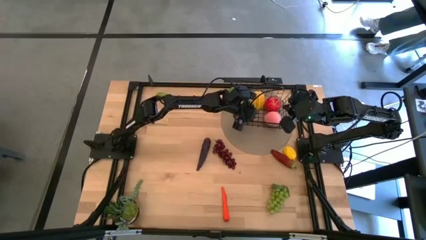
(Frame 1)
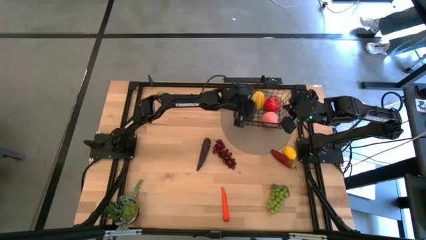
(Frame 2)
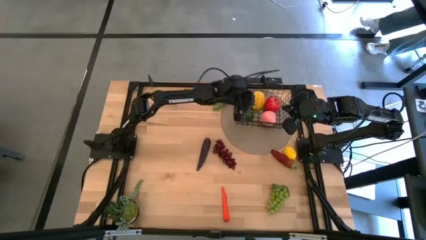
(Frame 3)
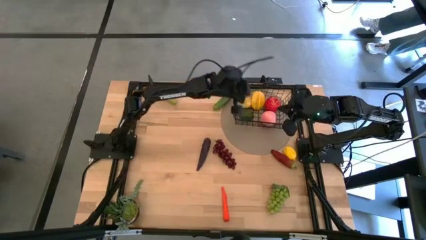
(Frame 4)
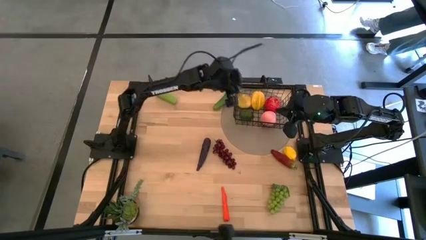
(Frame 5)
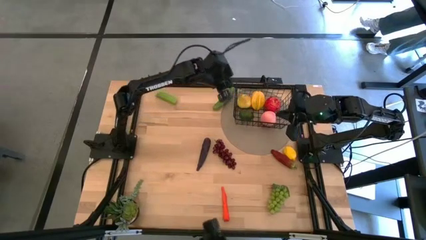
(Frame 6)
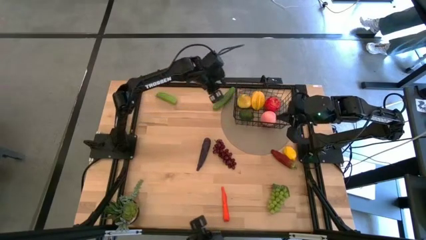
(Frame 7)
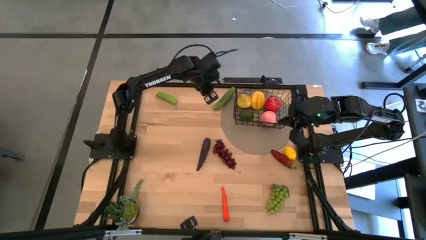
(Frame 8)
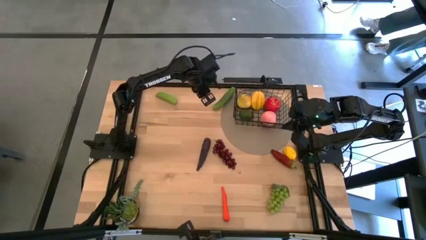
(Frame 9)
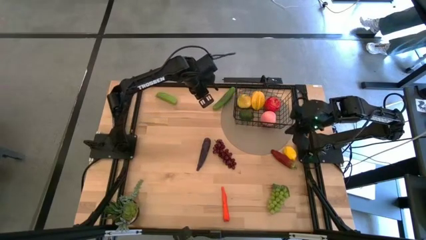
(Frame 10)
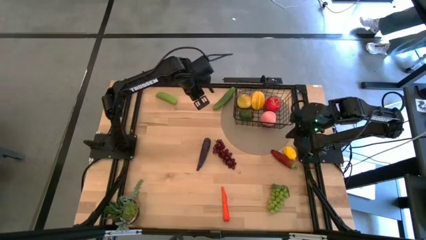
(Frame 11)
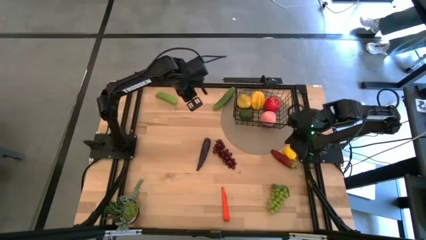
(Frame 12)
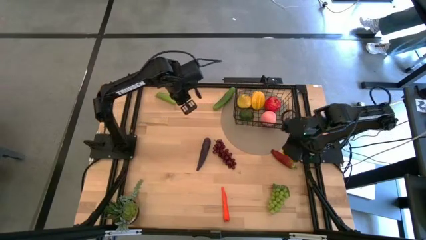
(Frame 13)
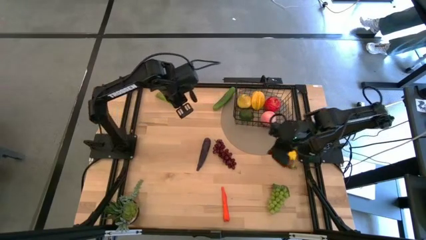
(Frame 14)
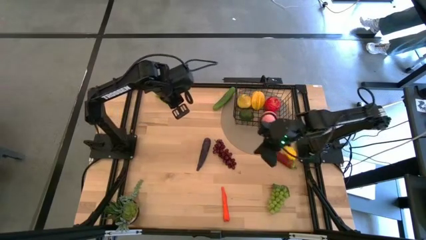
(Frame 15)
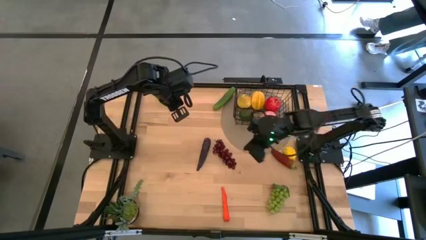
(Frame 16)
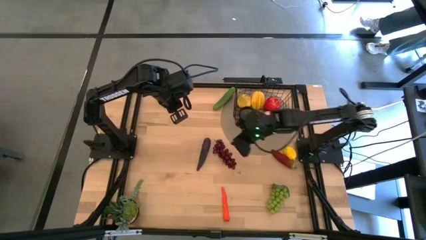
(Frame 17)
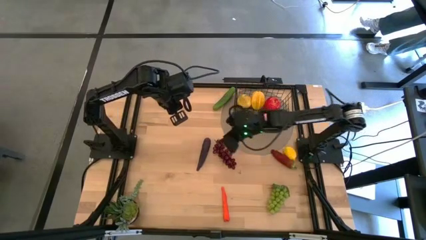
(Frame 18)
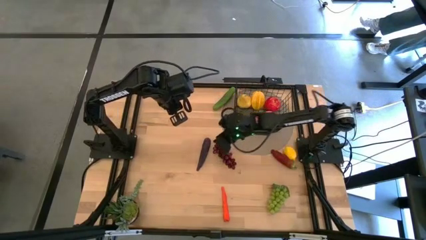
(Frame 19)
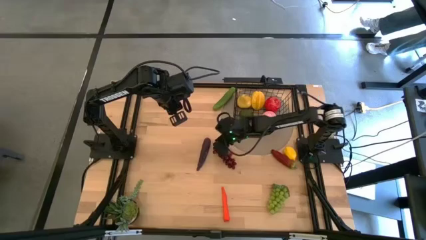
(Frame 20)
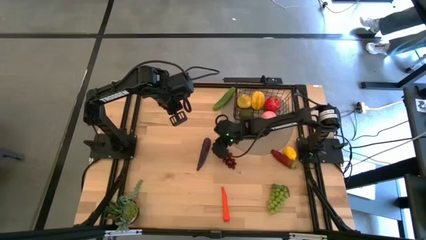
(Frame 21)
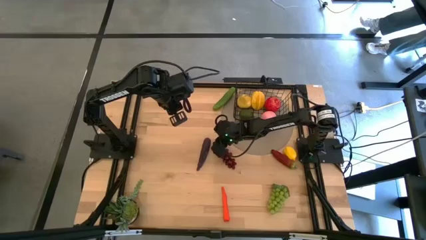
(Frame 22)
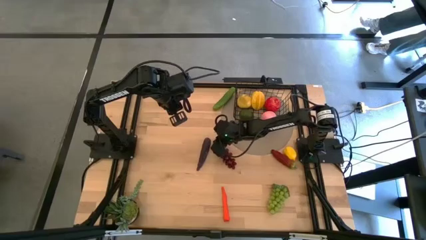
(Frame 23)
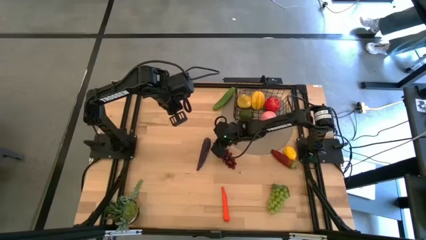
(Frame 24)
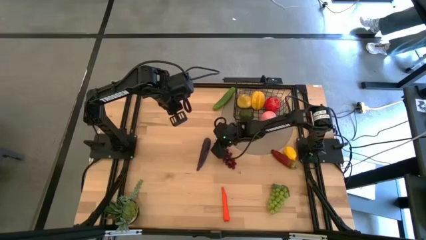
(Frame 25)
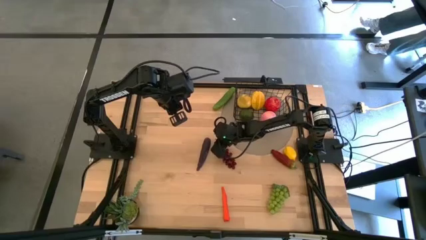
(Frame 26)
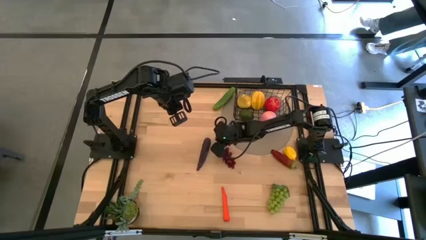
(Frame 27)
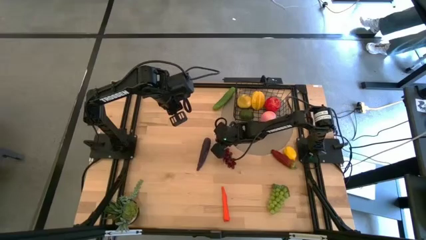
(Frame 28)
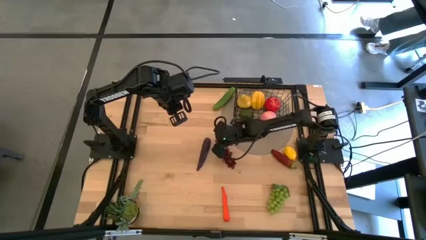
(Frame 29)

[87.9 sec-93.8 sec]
Task: Build produce basket
Put the red grapes into the black wire basket

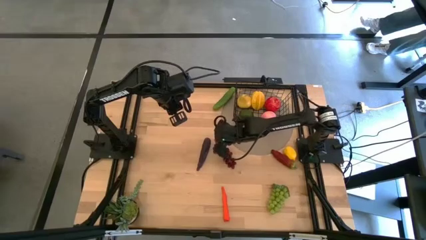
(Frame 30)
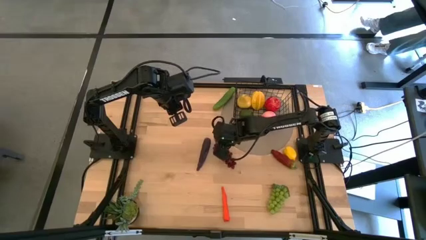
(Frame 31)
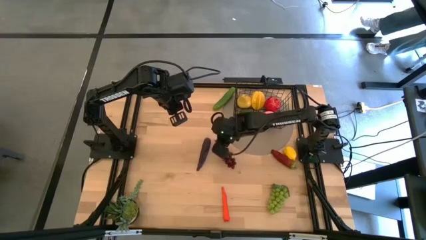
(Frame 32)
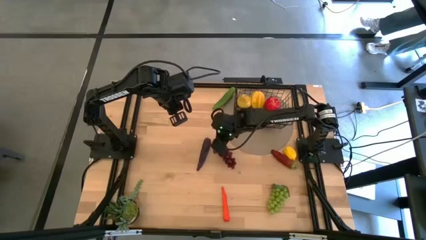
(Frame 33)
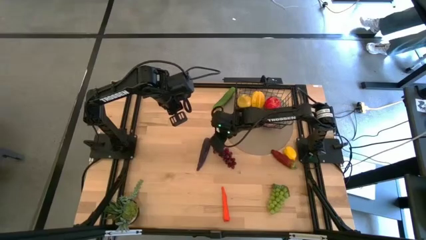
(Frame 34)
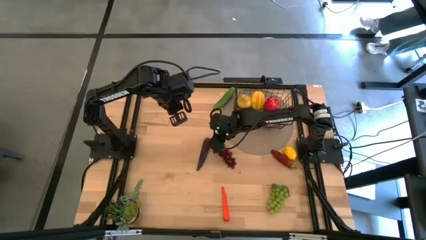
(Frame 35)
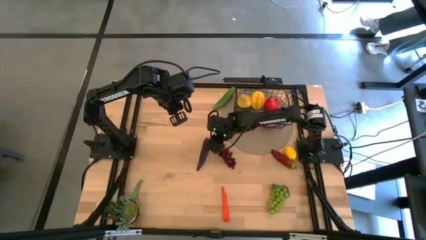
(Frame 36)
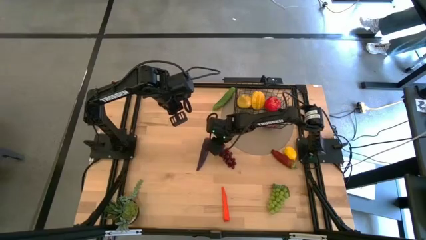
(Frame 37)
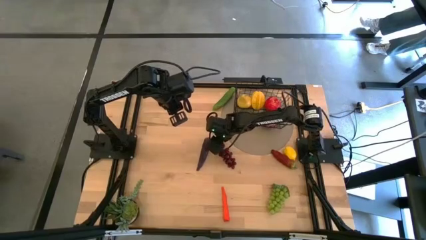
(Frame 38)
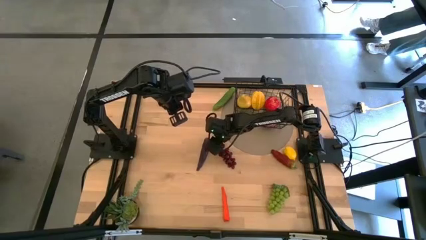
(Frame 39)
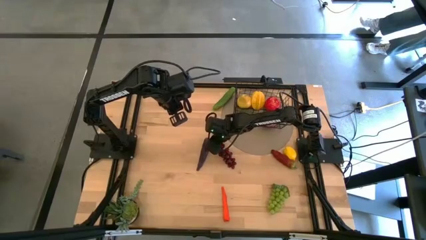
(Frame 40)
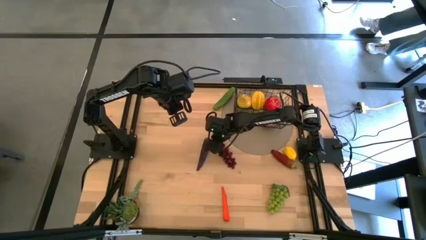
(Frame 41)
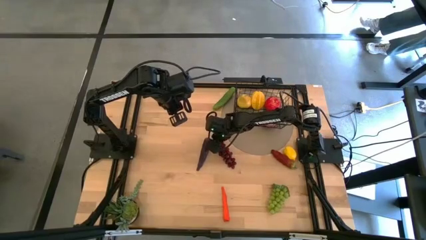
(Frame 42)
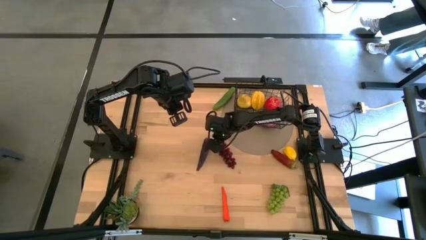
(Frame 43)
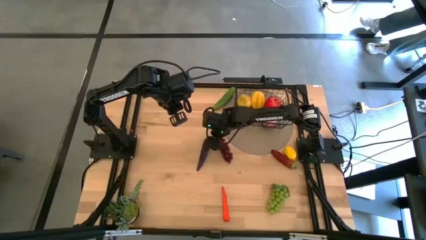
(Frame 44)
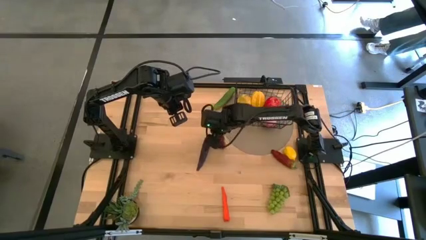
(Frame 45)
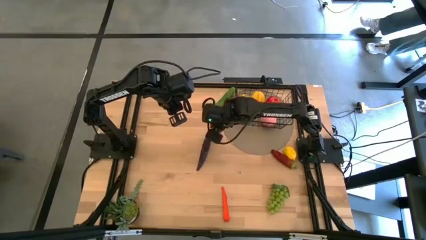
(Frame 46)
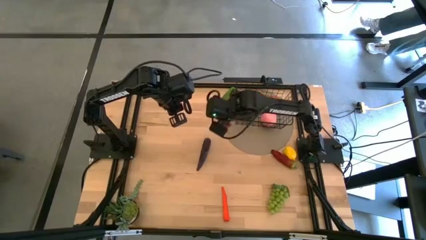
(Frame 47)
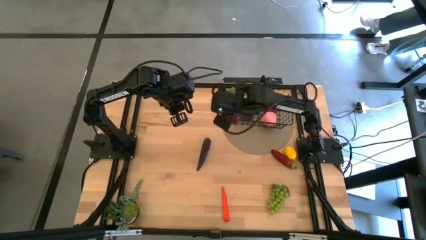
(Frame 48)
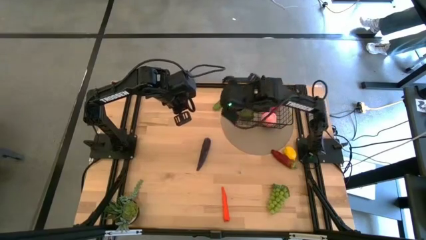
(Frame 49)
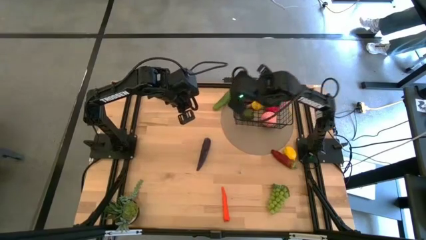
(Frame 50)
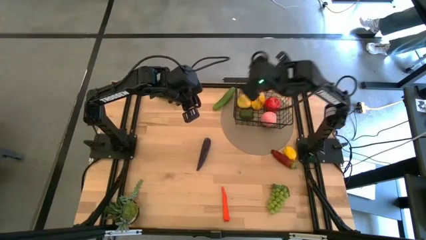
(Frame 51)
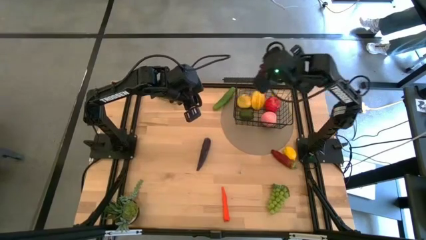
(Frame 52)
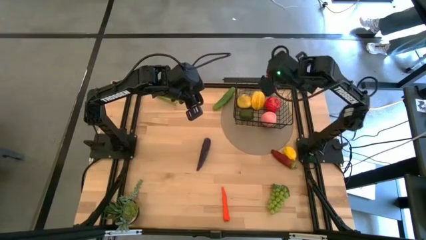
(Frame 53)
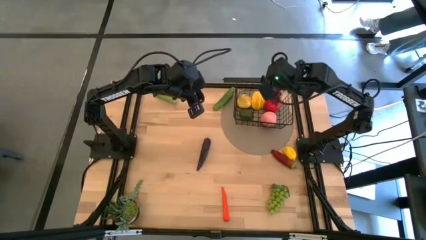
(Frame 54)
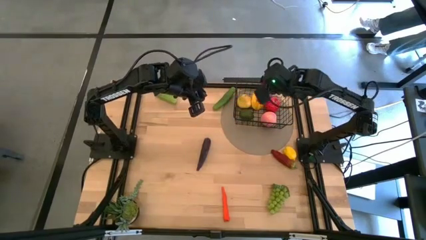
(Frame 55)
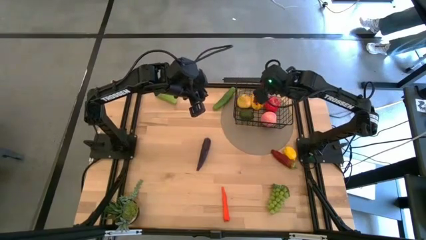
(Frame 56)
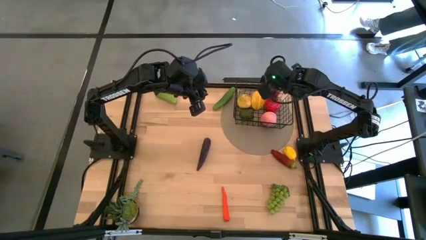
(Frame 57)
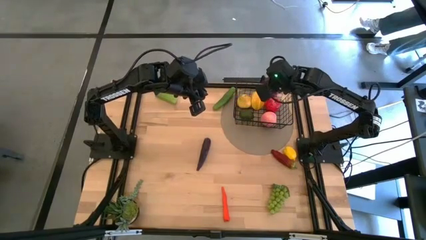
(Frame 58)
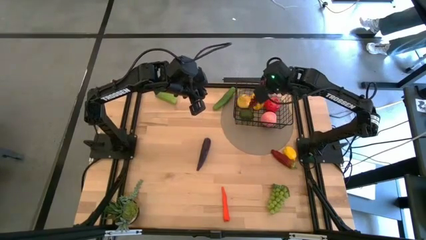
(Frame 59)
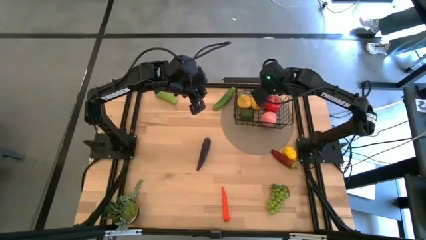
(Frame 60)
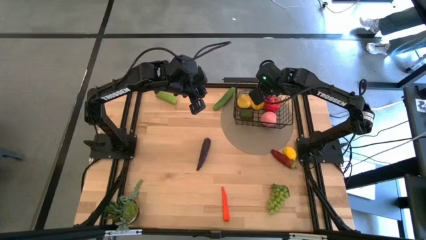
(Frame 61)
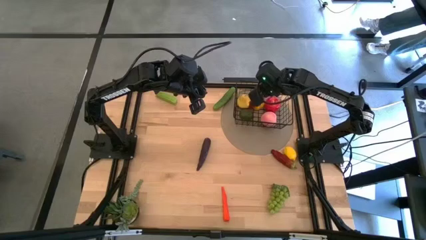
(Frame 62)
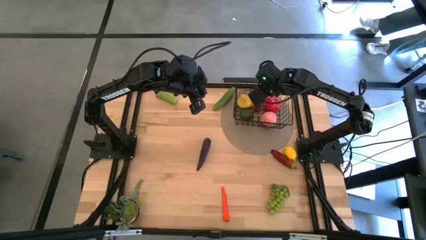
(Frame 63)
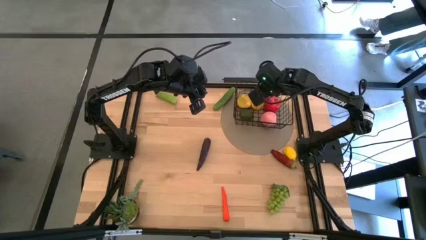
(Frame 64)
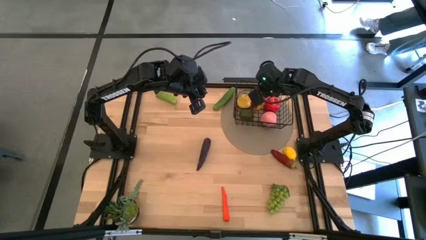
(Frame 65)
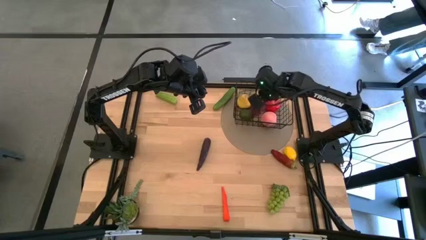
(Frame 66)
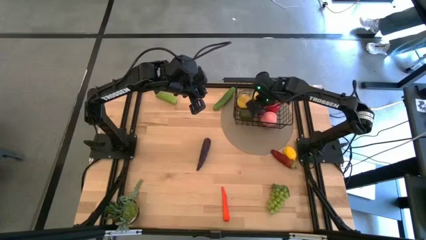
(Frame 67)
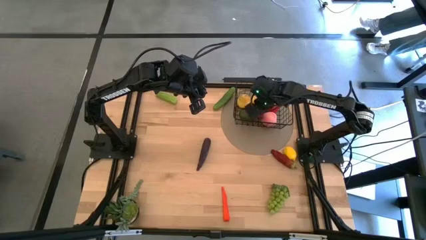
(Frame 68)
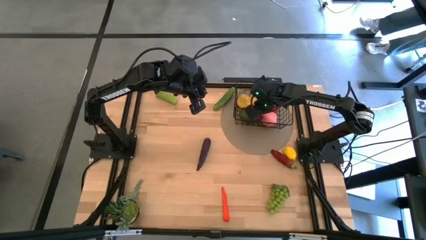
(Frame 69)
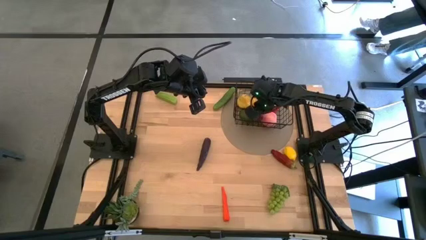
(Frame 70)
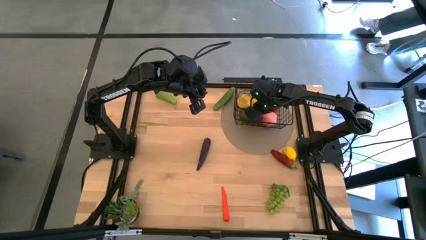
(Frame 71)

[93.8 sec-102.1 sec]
Put the red grapes into the black wire basket

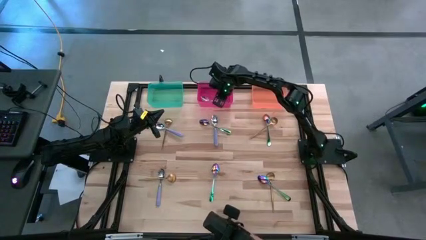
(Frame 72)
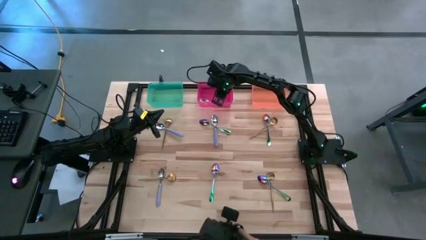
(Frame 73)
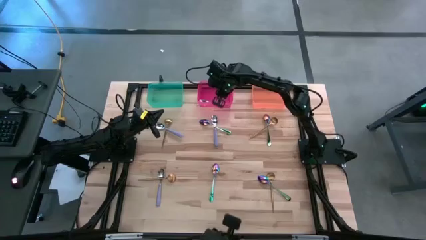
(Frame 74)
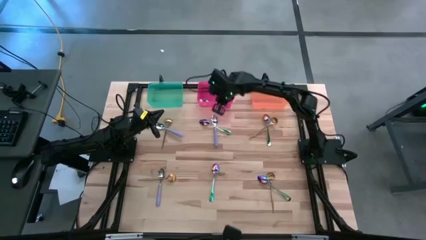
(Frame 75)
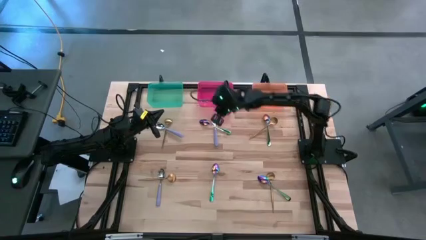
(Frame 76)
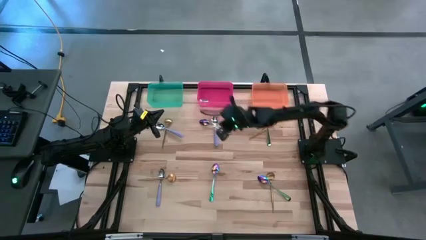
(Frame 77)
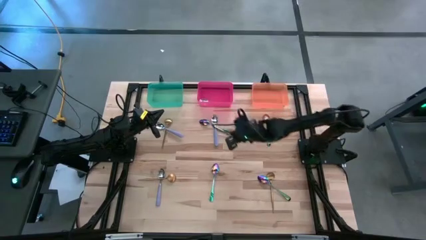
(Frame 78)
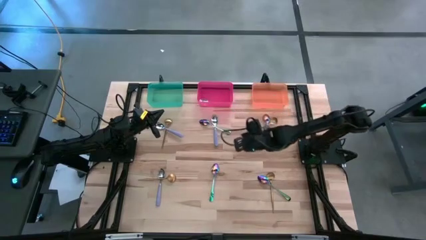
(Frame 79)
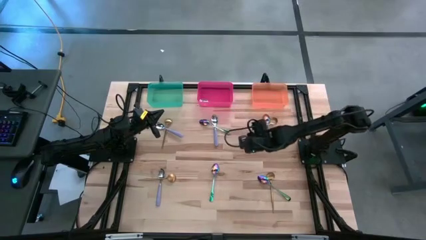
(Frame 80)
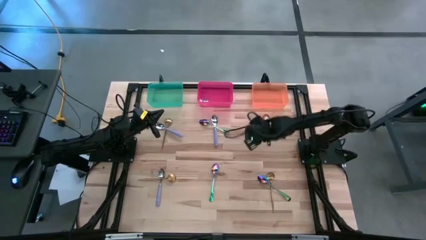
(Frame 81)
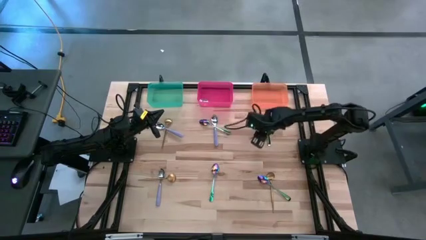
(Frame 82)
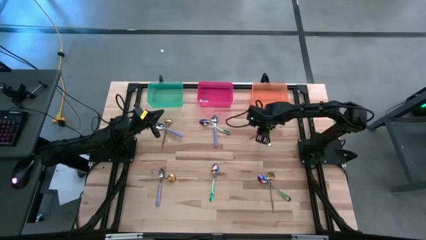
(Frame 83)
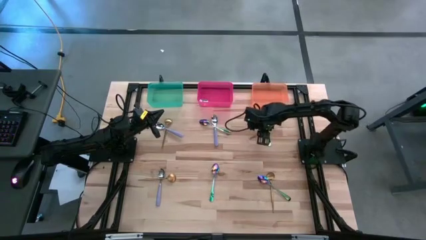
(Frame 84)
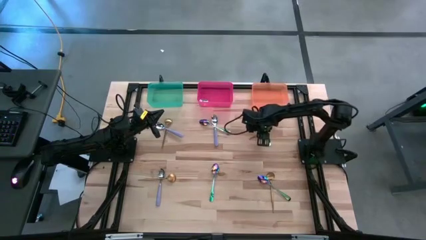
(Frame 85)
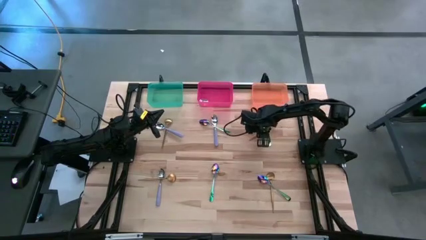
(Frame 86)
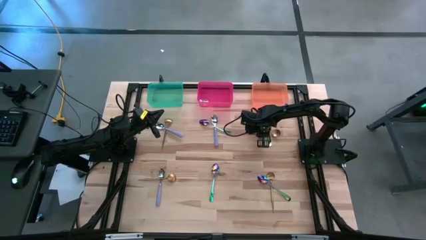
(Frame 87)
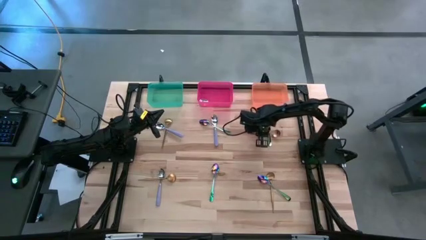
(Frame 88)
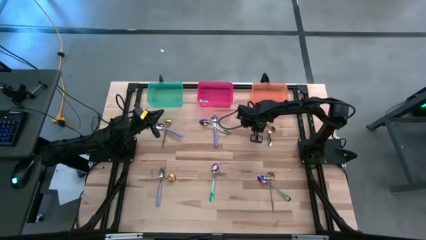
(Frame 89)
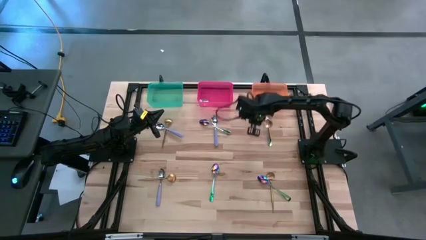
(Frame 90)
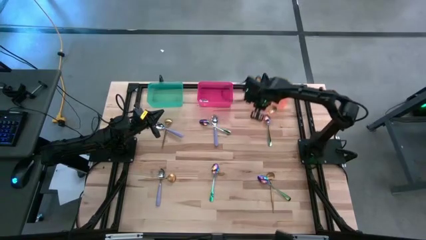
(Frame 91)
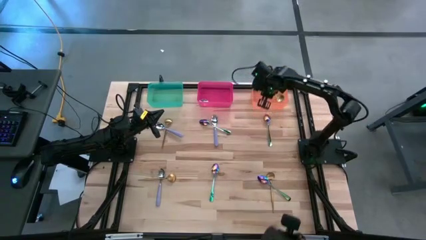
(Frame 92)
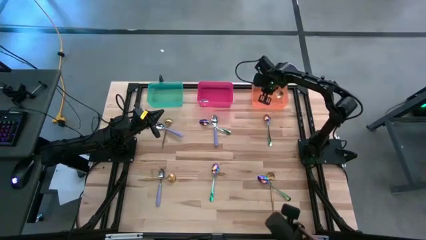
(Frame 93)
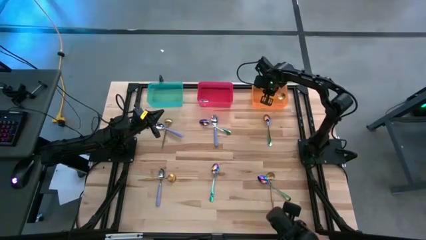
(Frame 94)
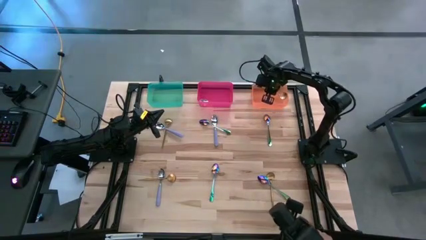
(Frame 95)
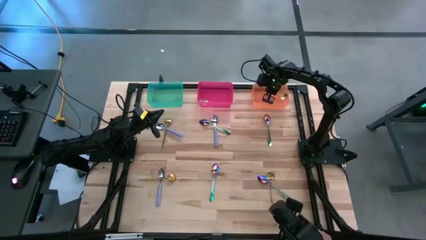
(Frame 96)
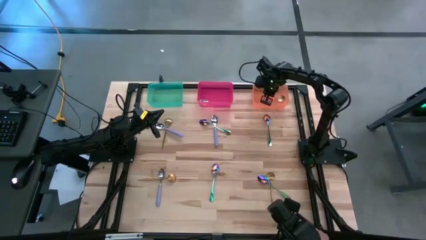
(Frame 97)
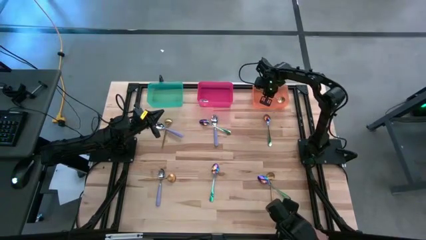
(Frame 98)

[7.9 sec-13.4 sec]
Task: Sort silverware by color (type)
Put the gold spoon into the orange bin
